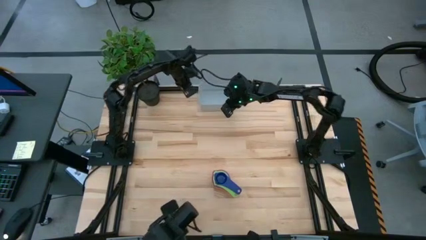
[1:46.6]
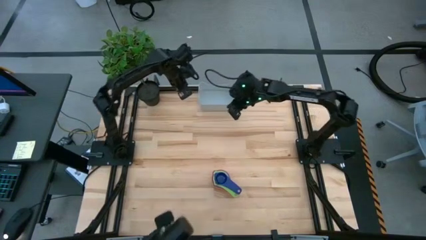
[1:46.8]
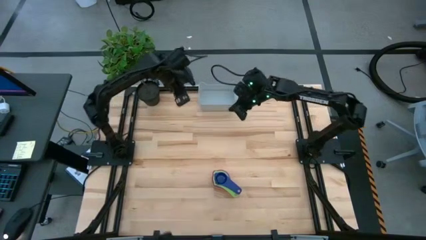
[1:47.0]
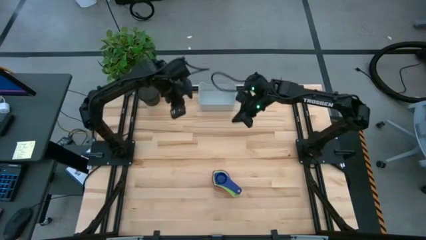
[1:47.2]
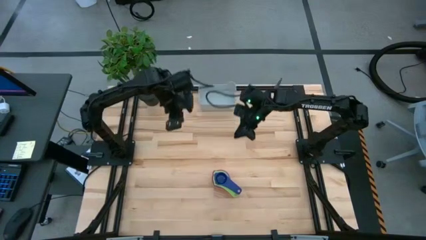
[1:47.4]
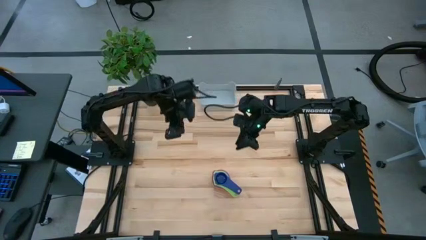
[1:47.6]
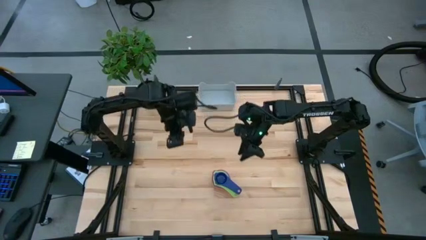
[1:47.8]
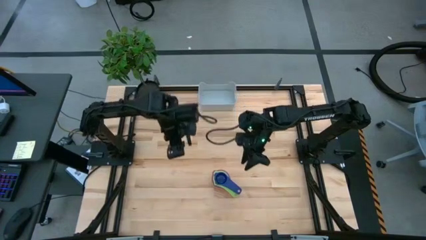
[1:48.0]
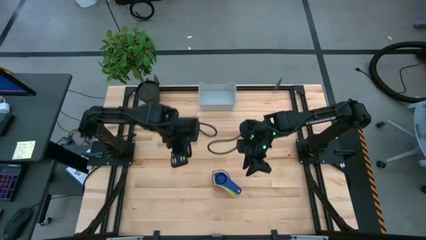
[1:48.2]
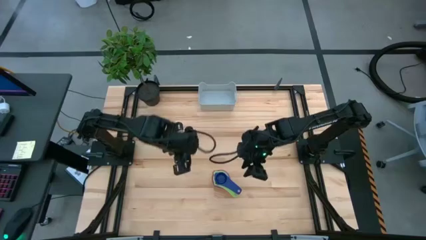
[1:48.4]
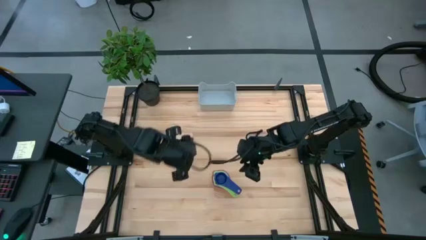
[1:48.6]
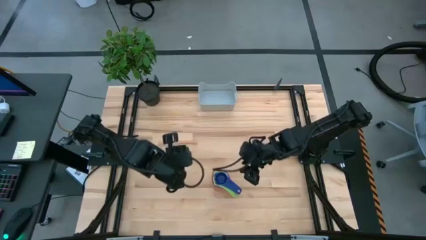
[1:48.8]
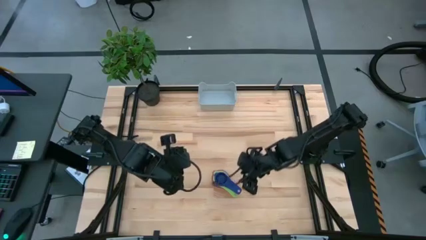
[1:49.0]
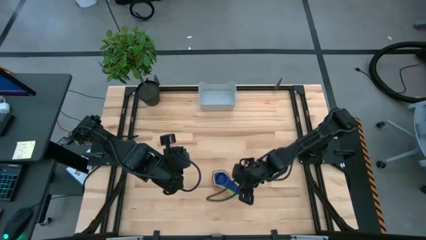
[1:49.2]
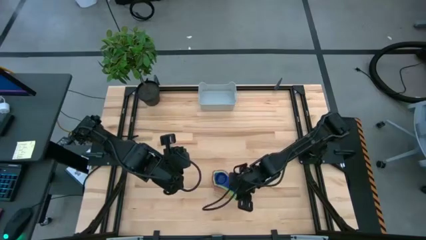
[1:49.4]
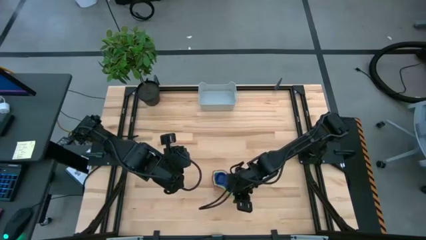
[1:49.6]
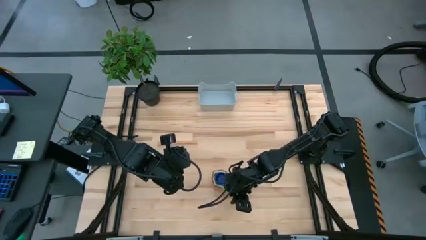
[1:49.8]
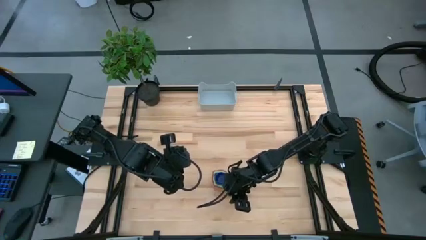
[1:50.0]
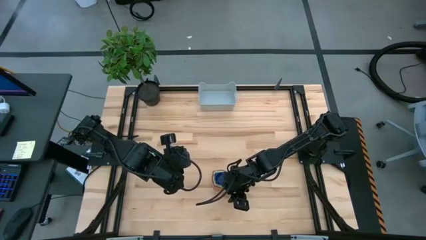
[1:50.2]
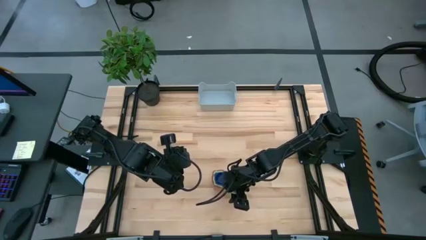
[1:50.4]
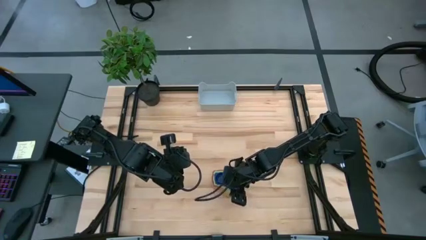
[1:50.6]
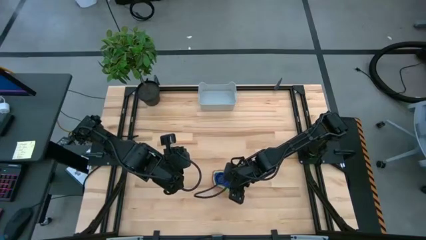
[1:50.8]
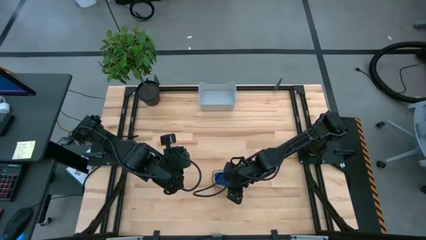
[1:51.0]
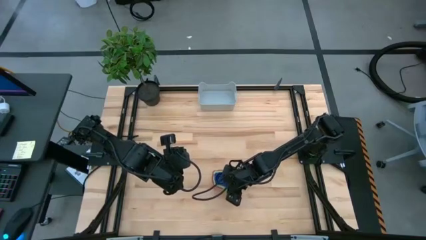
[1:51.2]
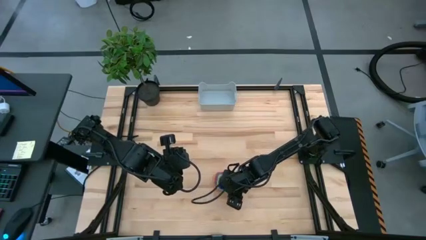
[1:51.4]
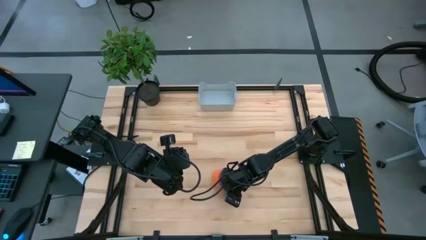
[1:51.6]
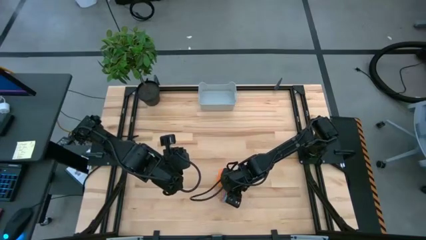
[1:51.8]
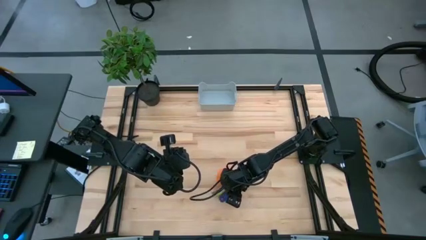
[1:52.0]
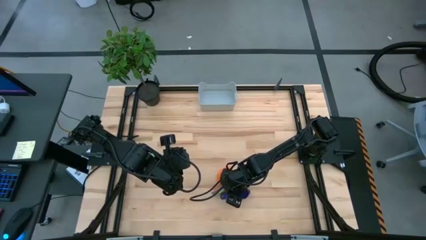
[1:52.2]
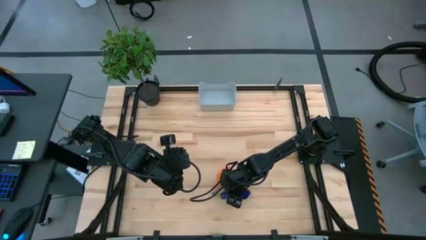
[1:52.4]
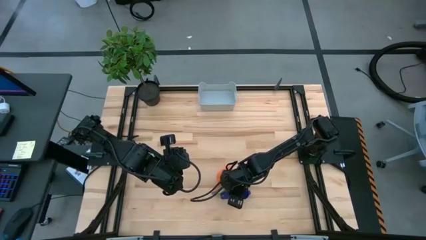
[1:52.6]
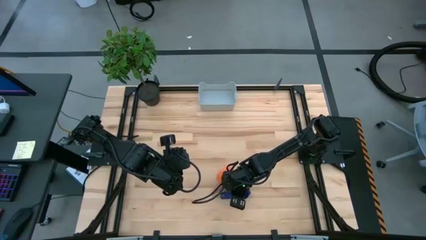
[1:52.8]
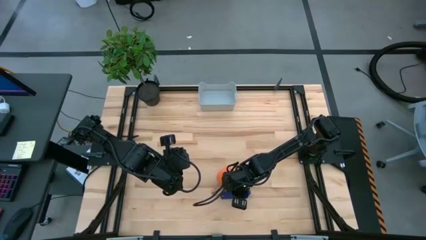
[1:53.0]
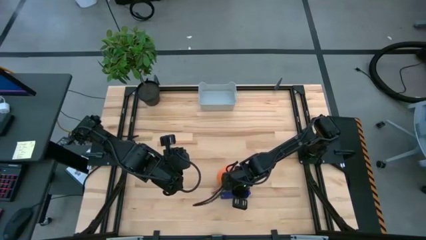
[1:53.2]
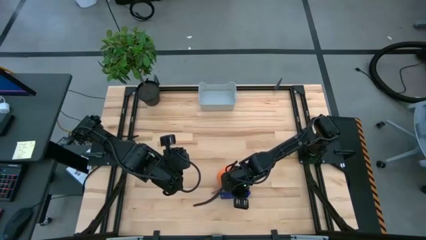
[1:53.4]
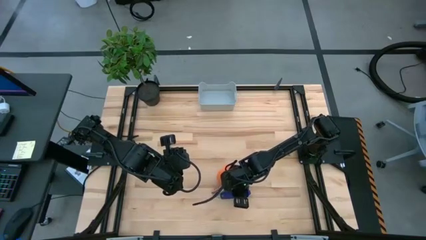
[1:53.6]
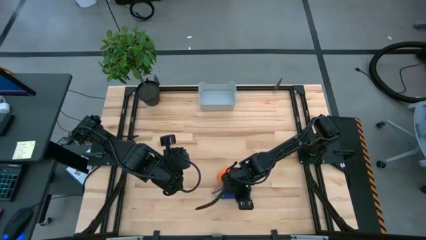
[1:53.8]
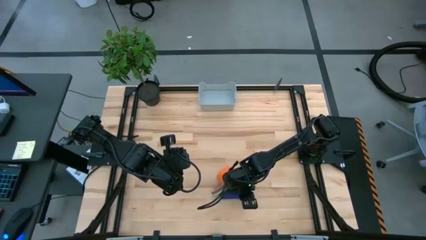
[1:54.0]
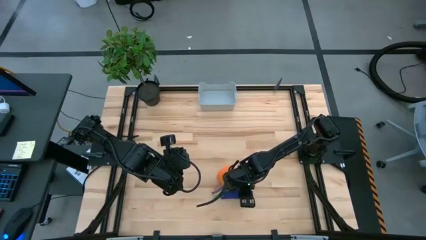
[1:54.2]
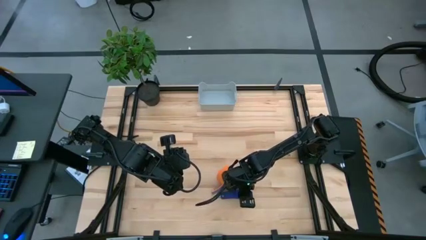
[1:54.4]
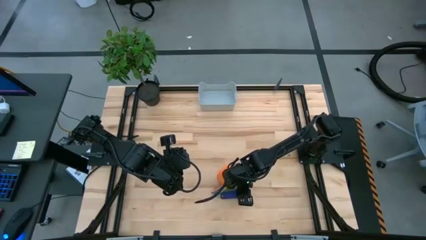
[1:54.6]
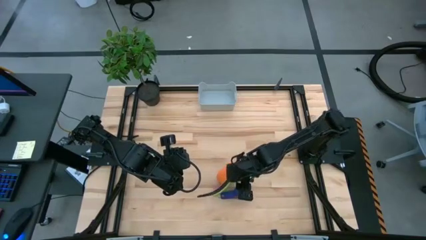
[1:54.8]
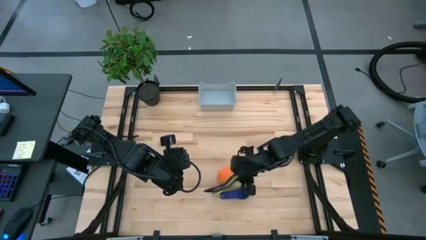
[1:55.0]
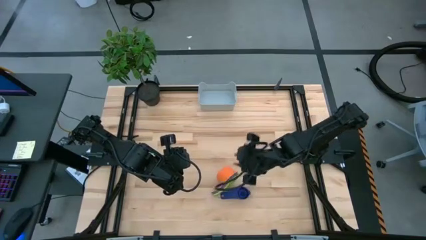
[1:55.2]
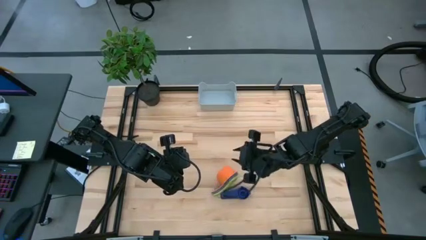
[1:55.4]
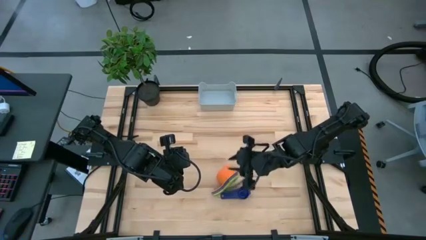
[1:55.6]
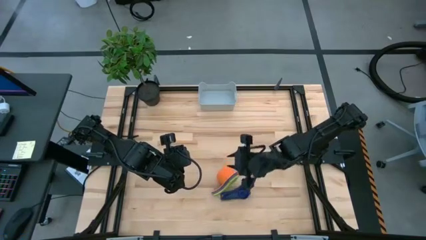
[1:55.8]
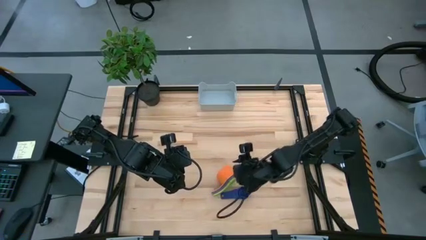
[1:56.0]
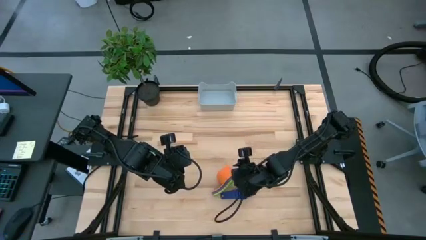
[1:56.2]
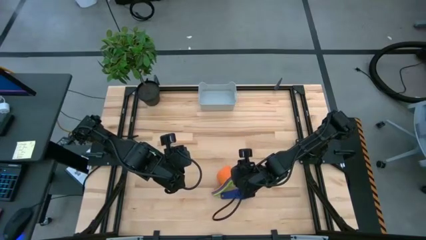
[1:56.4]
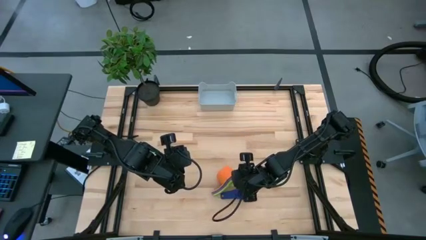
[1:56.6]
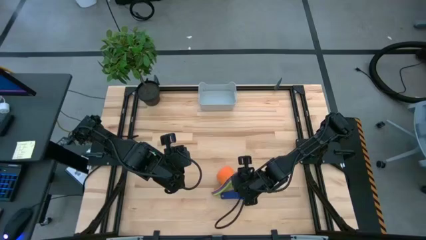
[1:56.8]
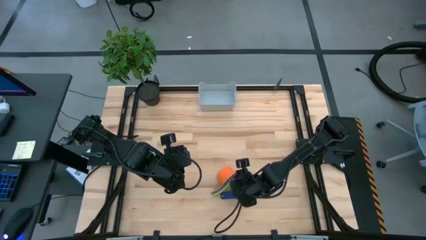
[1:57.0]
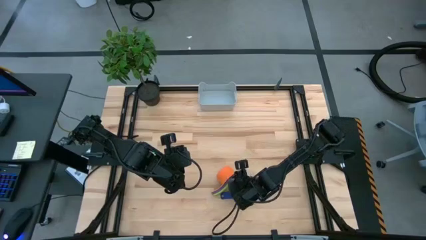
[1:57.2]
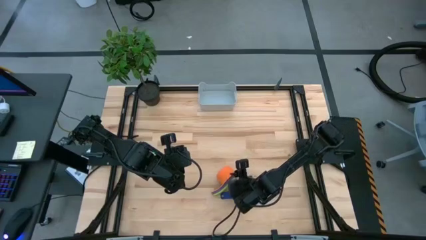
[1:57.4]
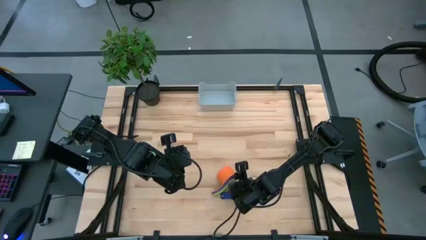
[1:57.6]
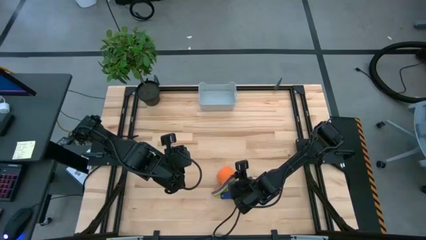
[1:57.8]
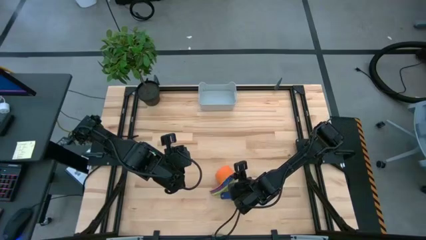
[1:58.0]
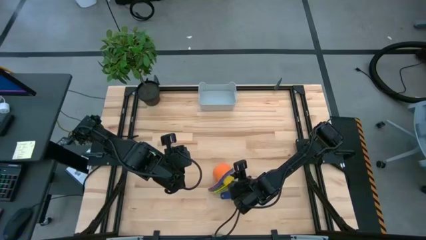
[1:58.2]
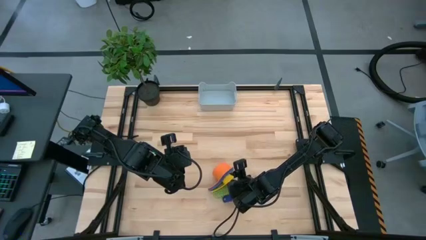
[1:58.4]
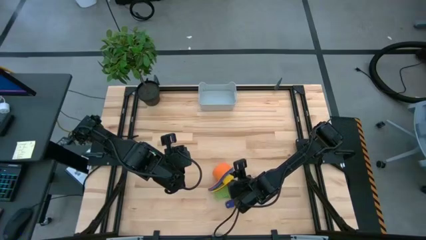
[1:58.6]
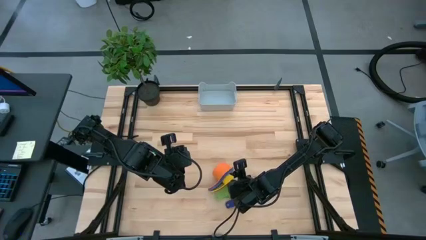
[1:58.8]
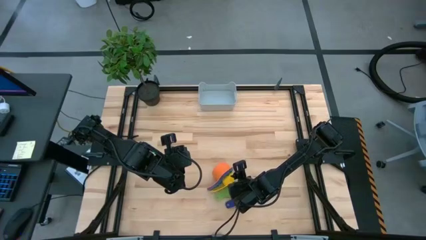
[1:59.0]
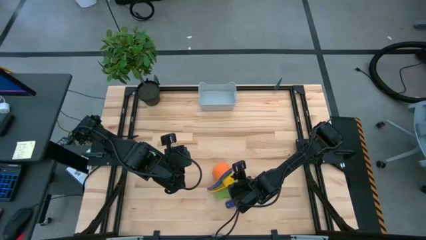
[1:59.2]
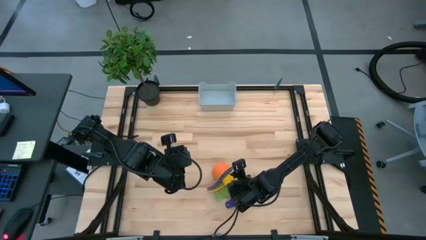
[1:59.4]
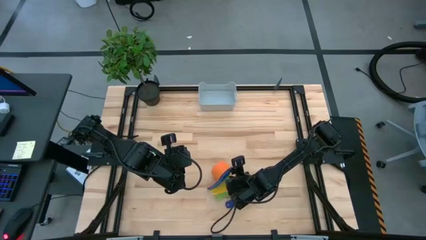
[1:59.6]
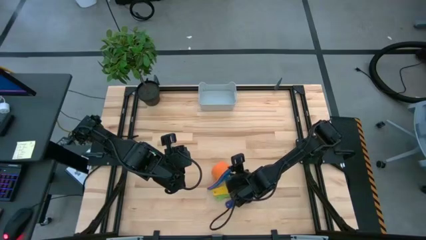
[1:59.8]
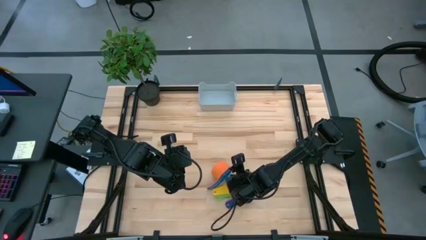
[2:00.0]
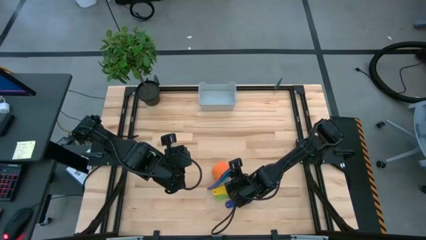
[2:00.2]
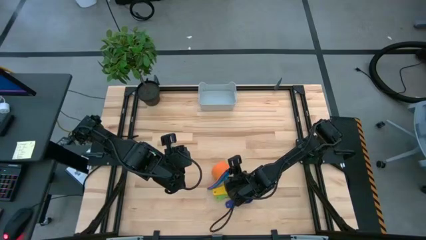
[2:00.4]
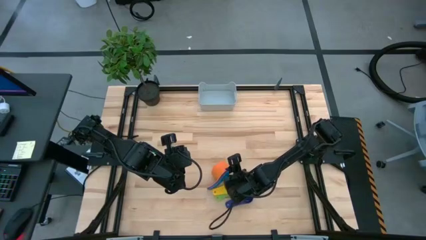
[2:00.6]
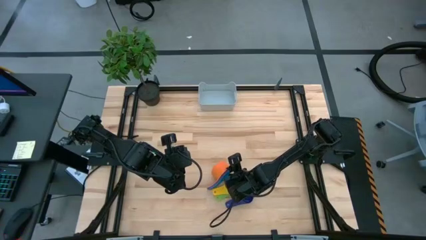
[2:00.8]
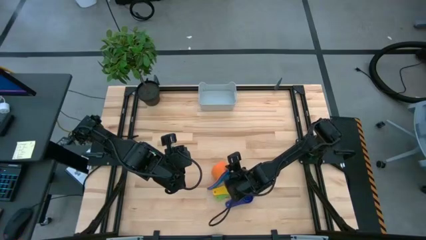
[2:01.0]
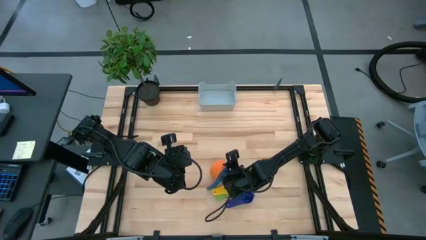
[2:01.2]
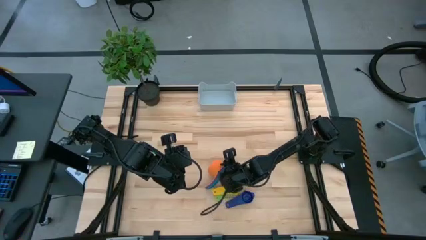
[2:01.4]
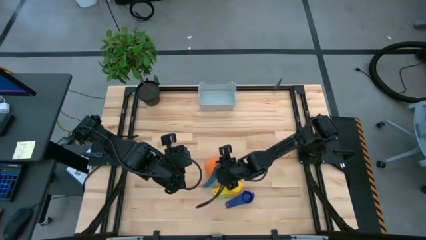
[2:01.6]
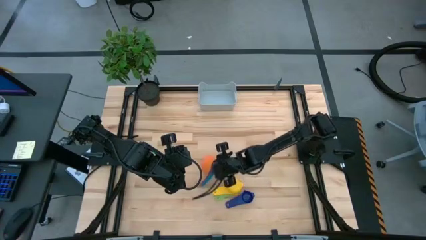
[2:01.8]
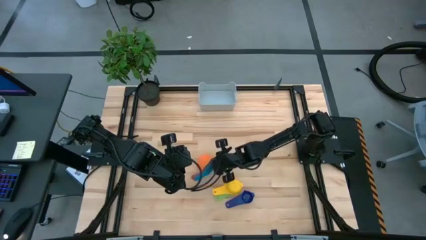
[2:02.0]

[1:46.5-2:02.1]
Task: Nest measuring cups in basket
Put the stacked measuring cups into the gray bin

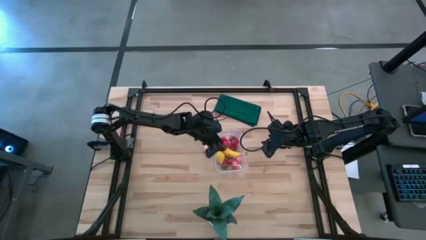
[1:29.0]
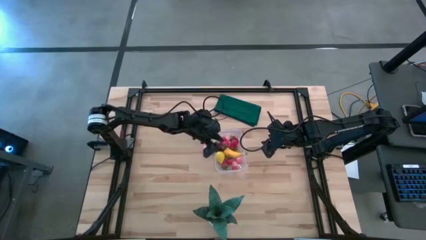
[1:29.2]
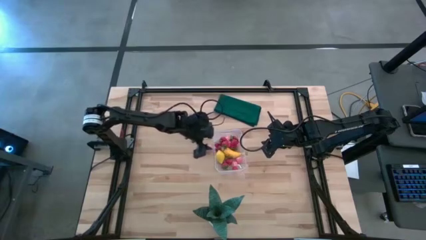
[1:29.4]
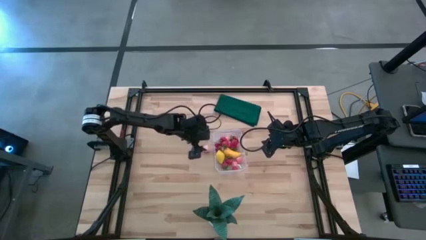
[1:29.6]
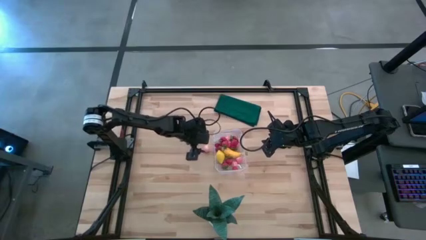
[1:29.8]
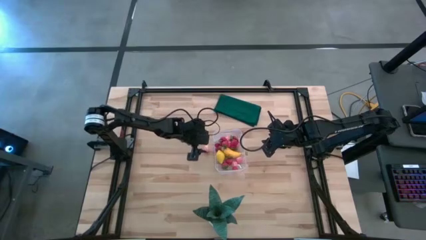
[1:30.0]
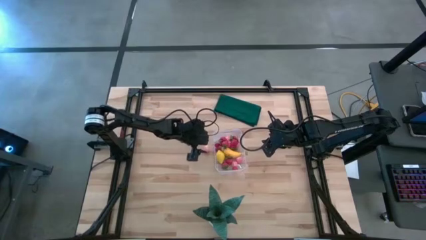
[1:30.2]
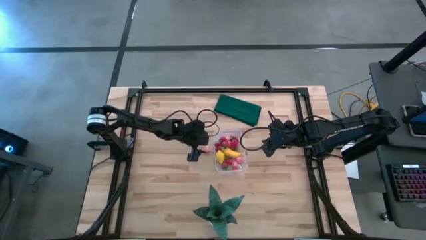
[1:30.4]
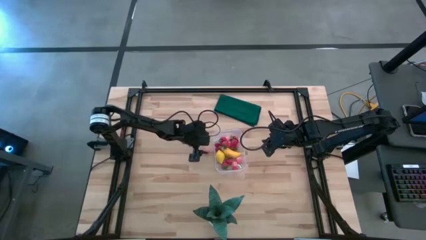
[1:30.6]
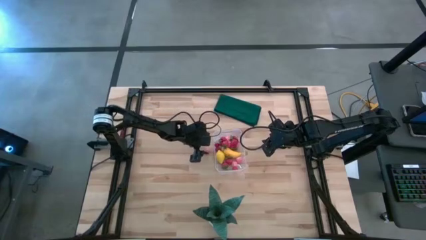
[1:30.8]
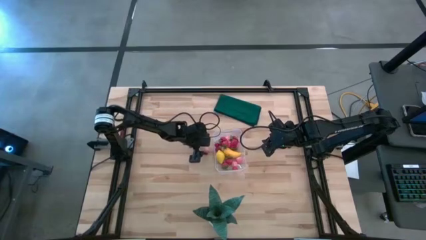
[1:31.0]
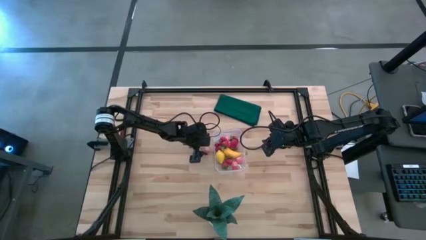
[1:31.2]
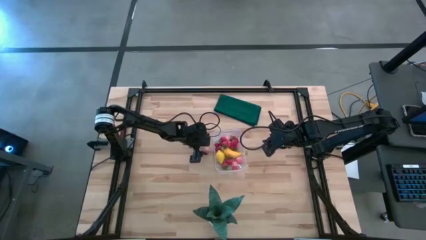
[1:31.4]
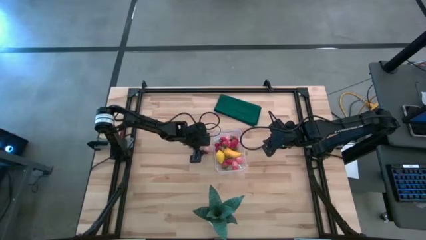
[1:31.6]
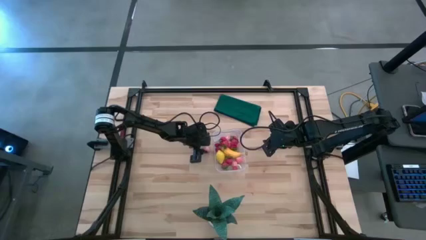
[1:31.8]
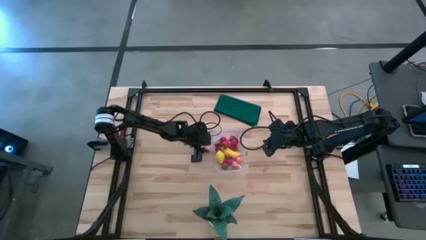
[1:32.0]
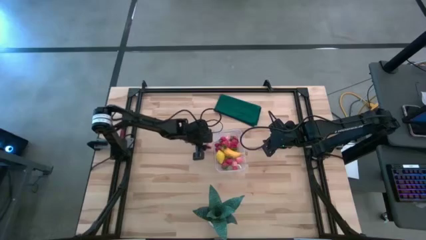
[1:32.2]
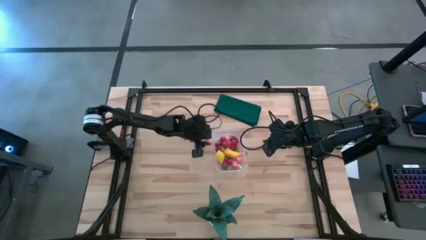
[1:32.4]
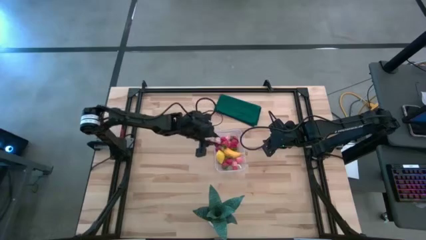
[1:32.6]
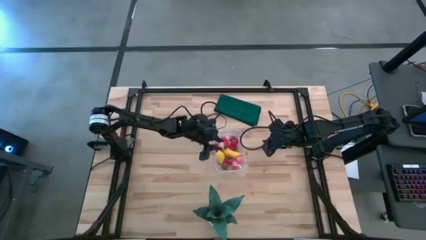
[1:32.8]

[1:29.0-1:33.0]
Task: Pick and placing Produce into tupperware
Put the peach into the transparent bin
